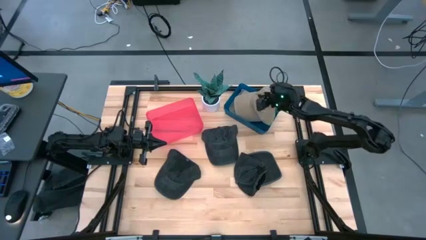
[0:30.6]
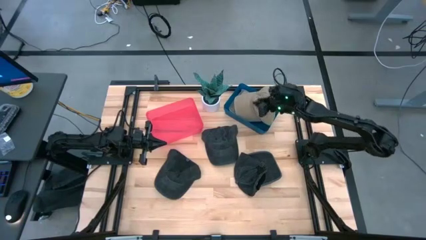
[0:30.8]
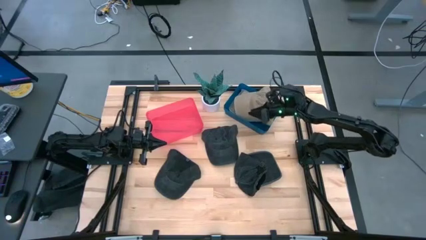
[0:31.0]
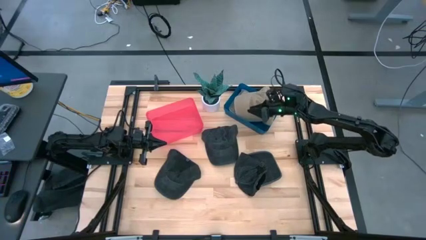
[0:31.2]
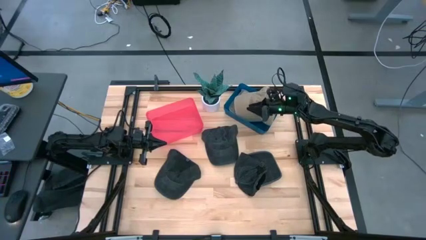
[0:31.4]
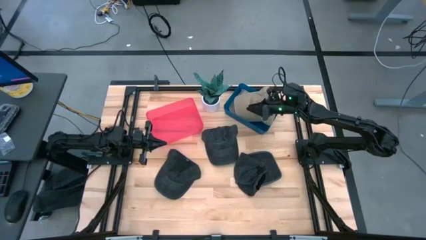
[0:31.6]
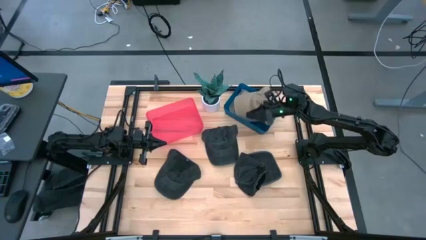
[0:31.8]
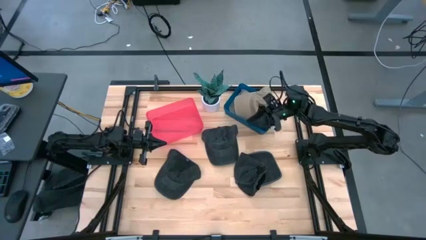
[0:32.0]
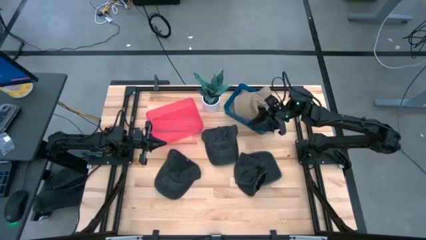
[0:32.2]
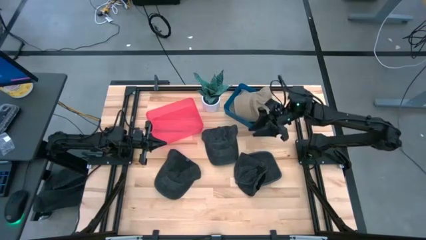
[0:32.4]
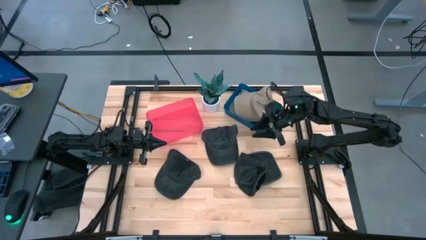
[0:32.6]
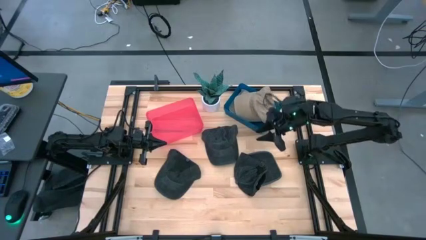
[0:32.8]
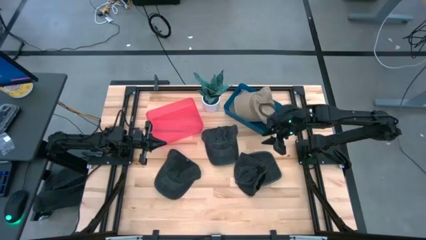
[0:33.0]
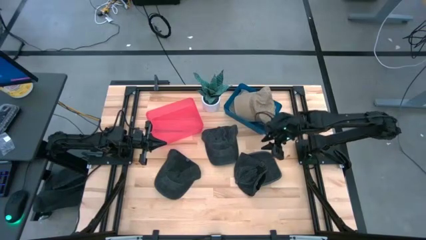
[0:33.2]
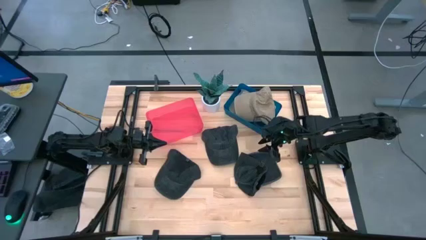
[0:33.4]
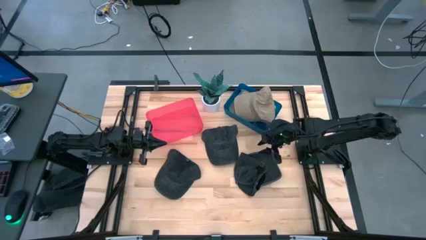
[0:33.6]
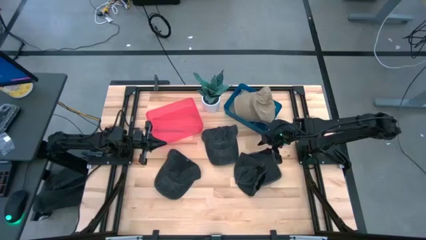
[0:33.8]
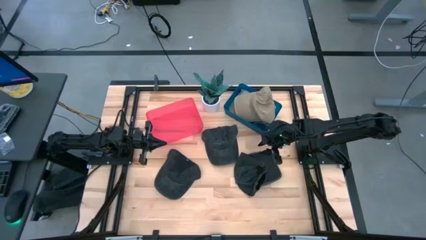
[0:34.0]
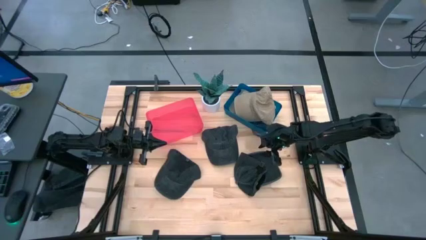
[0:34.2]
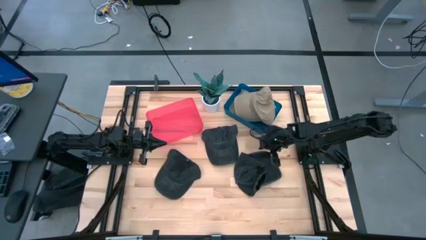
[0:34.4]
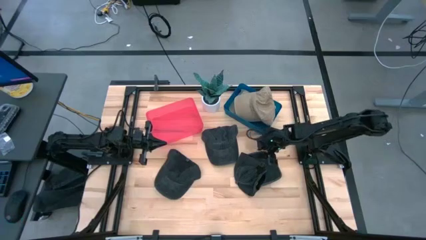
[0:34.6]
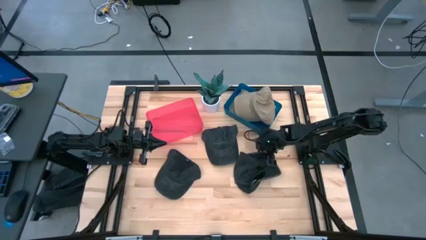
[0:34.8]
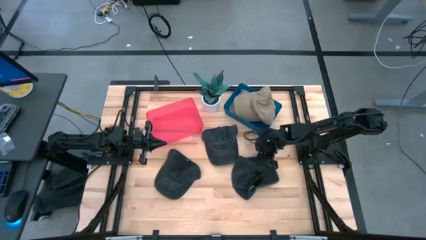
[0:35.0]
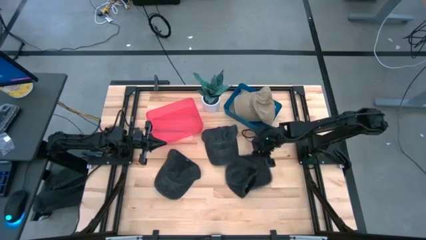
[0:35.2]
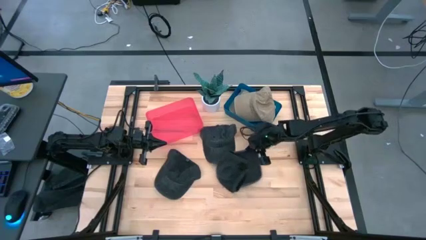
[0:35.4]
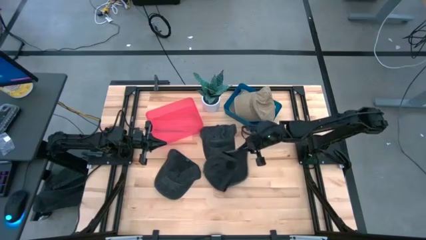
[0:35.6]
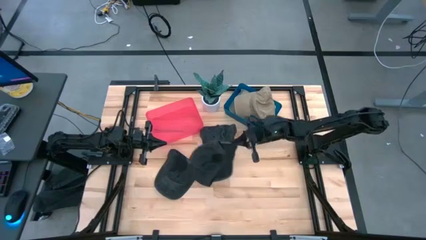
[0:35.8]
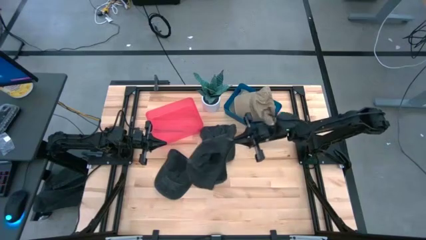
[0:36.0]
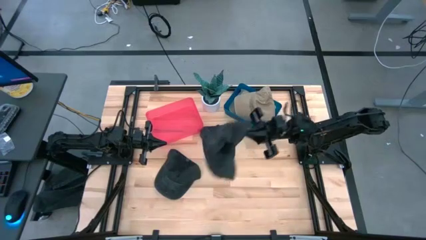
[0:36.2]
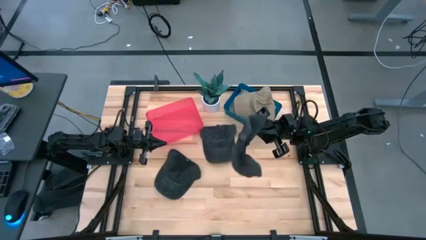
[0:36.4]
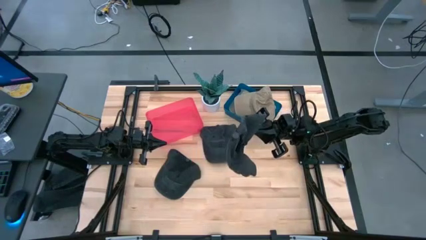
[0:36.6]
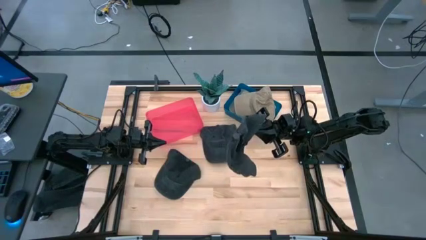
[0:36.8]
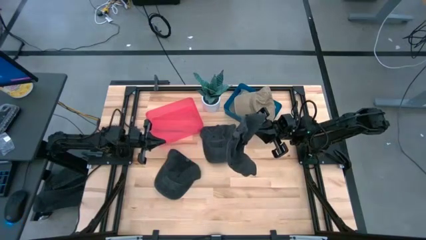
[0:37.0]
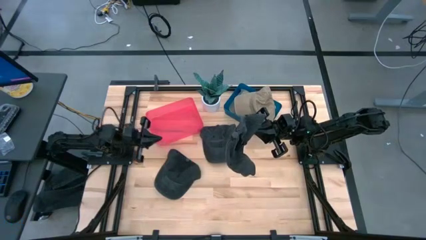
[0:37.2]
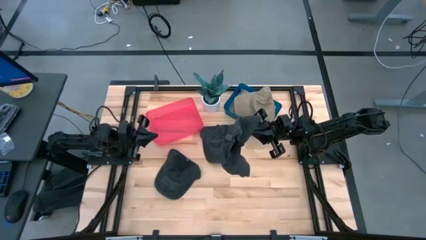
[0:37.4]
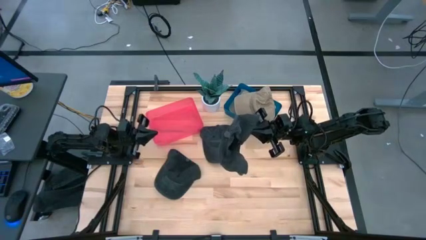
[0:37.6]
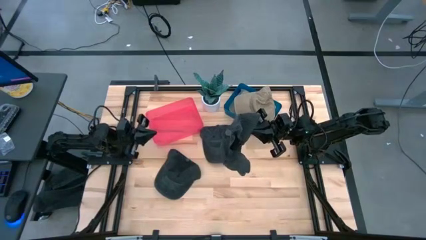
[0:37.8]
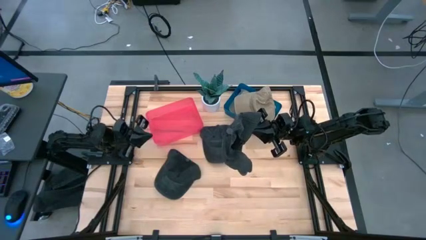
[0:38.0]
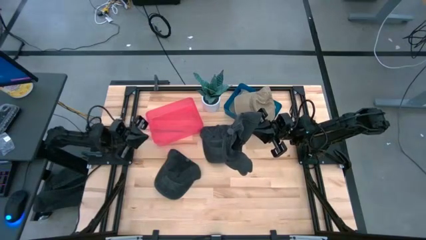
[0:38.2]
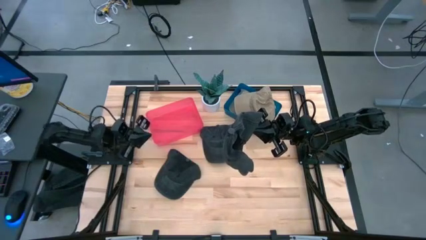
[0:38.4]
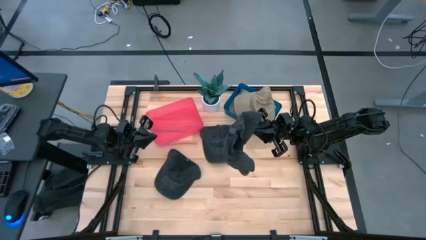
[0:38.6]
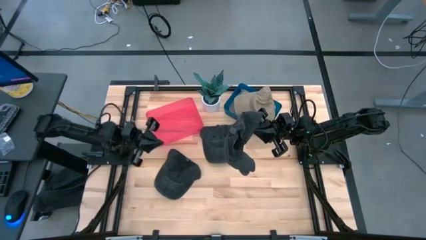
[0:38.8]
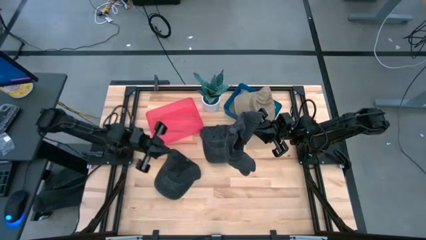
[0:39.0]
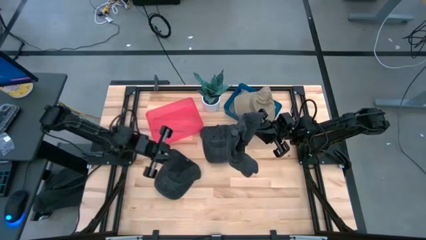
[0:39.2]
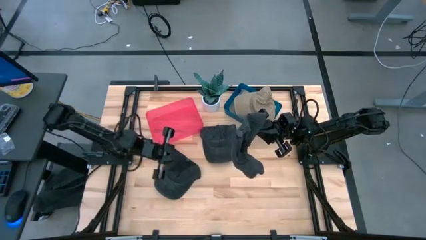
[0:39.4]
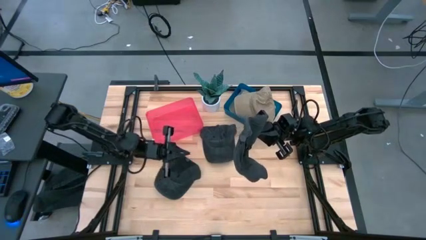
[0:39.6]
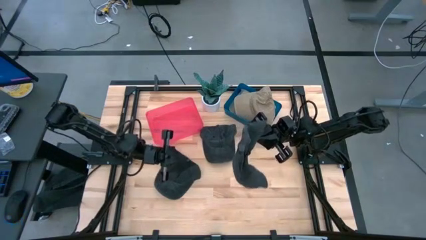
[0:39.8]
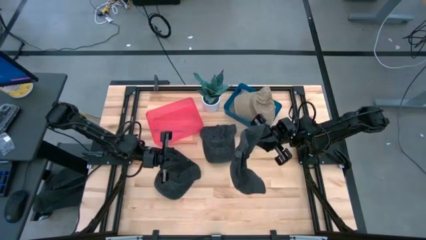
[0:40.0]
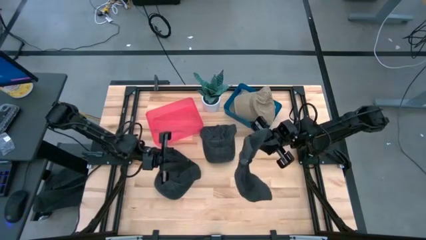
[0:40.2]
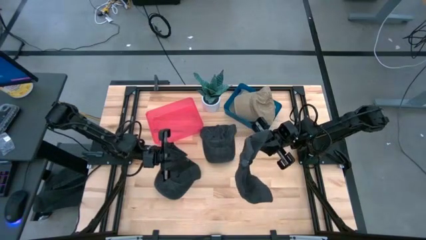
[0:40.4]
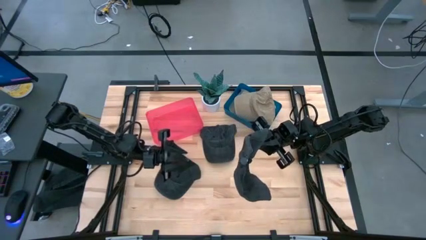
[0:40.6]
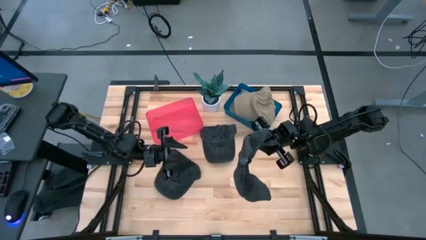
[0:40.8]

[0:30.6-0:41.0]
Task: Pick & Place hat
Put the right black cap into the pink bin

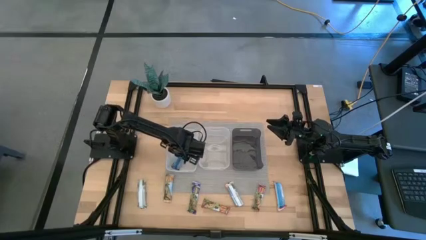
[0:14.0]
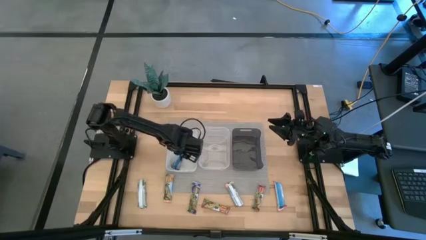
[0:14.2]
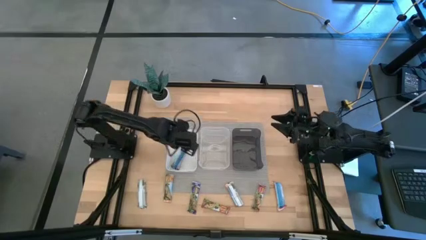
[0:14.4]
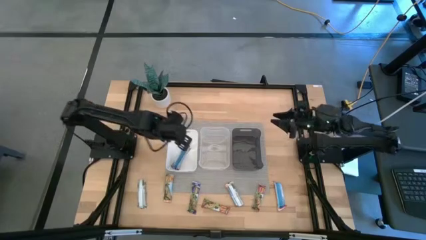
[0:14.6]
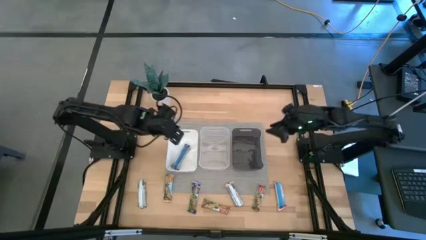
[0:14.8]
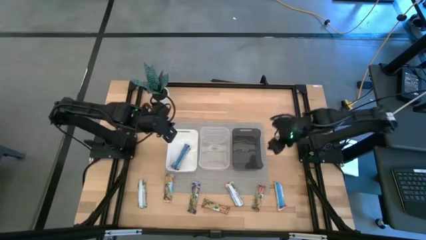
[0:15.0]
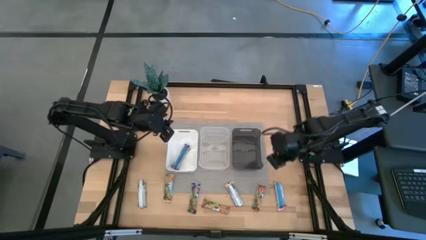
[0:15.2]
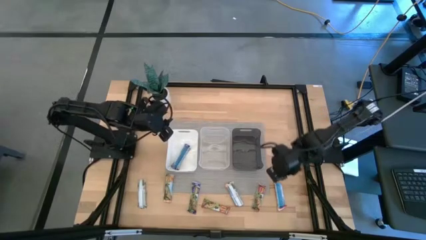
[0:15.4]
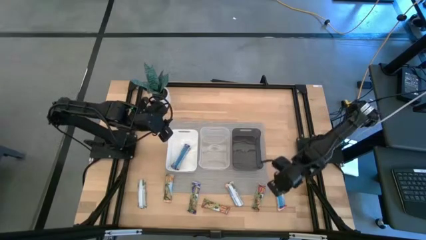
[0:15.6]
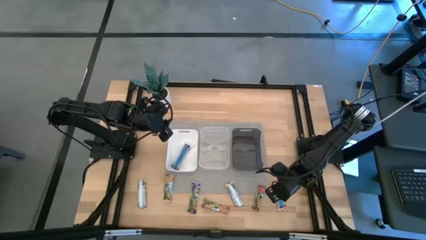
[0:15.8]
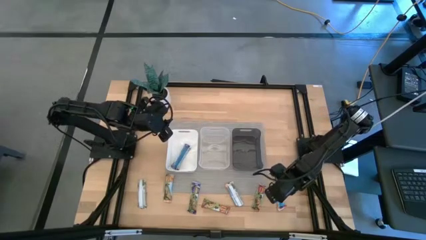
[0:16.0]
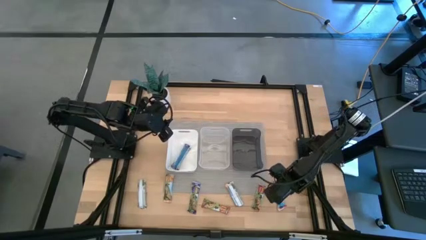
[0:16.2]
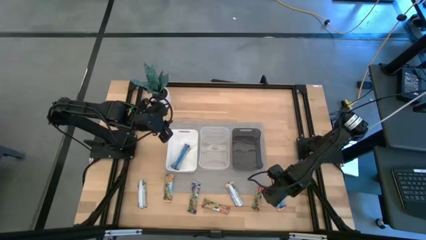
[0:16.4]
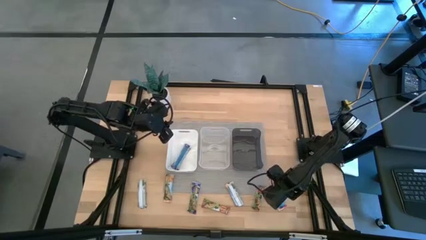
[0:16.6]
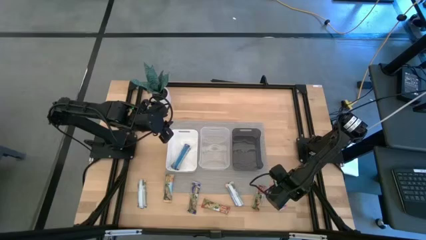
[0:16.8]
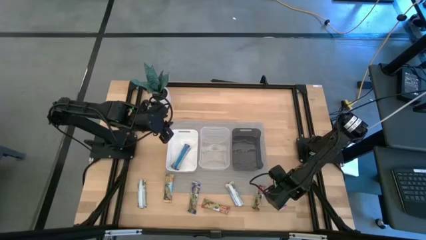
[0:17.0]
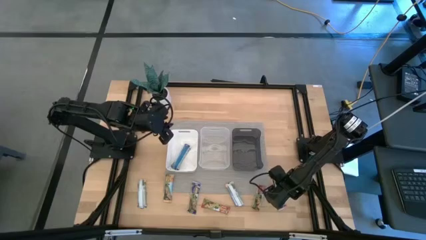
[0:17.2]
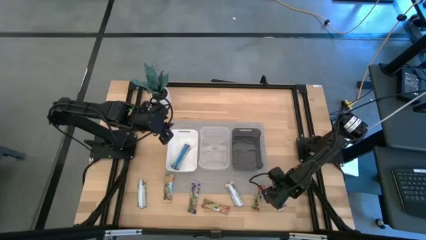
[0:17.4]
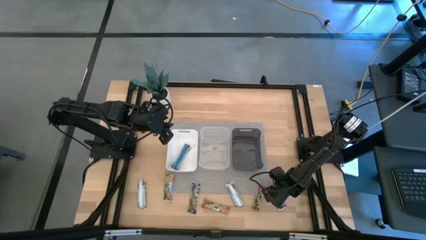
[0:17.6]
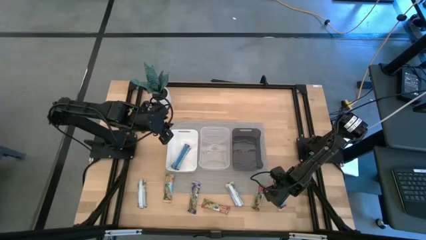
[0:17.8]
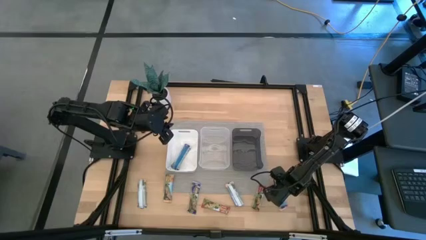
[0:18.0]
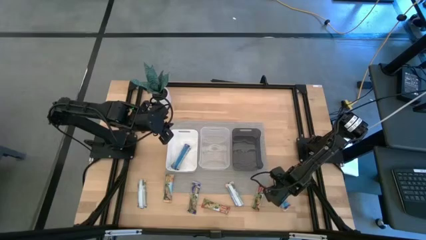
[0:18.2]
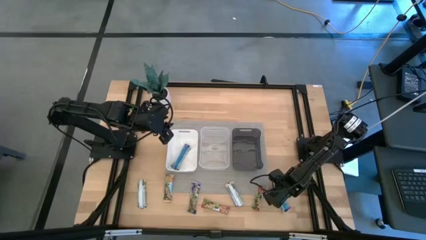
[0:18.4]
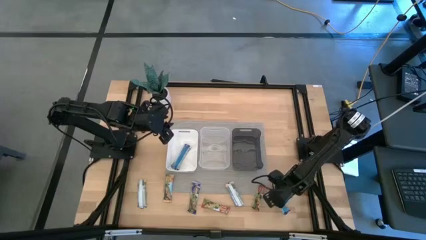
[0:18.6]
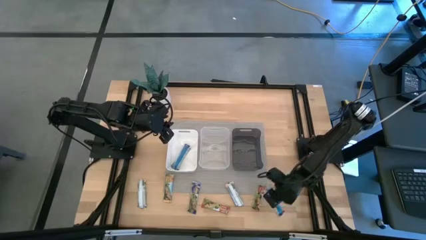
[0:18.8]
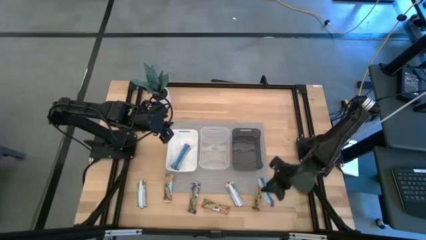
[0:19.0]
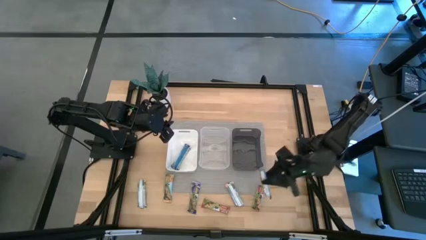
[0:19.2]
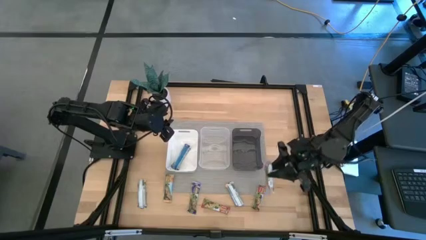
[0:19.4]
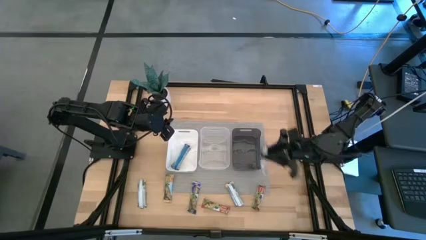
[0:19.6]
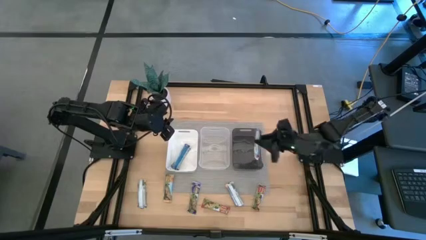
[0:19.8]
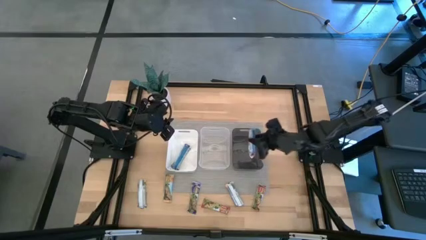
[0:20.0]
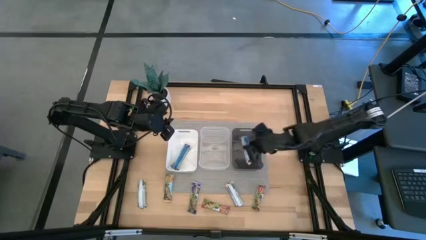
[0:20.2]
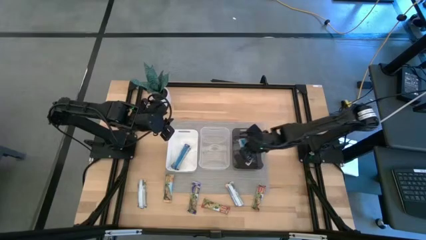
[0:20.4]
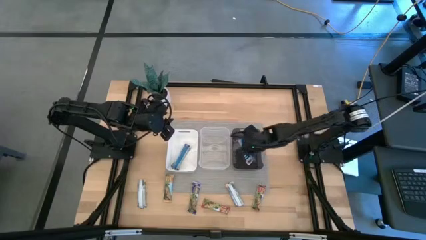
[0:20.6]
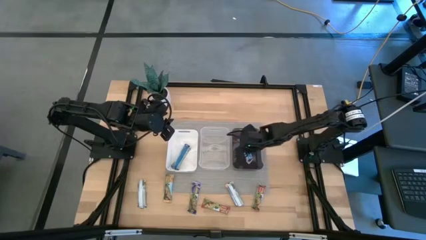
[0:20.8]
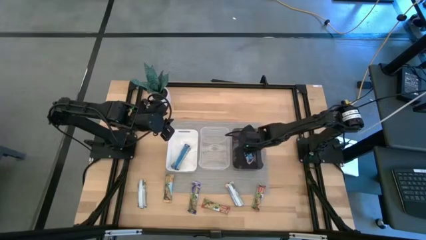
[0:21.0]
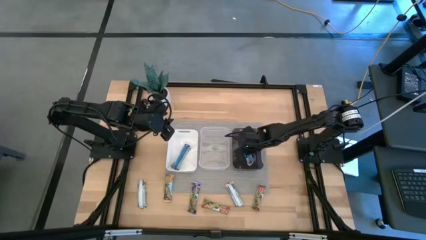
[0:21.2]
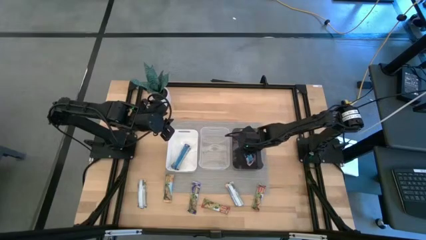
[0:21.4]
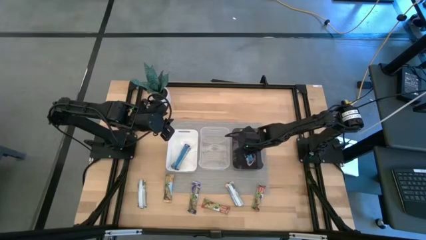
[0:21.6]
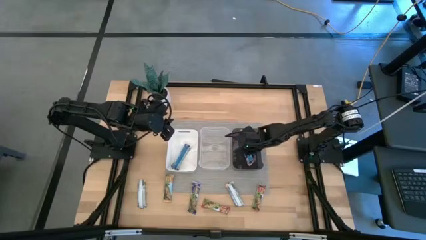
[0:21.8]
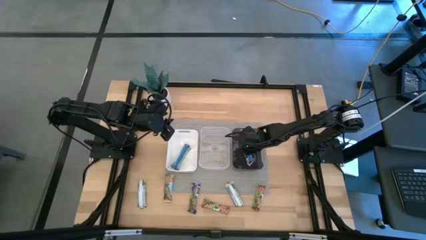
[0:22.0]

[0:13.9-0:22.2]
Task: Pick and place Granola Bars by type
Put the right red granola bar into the black bin
